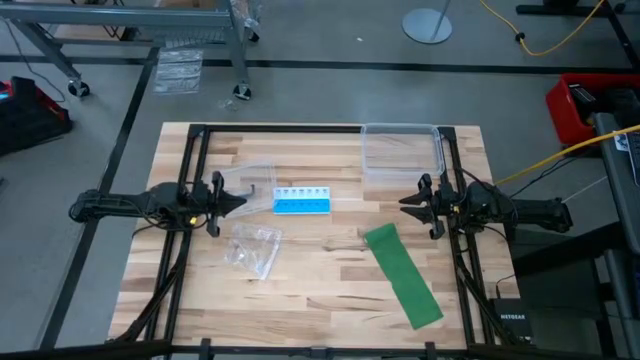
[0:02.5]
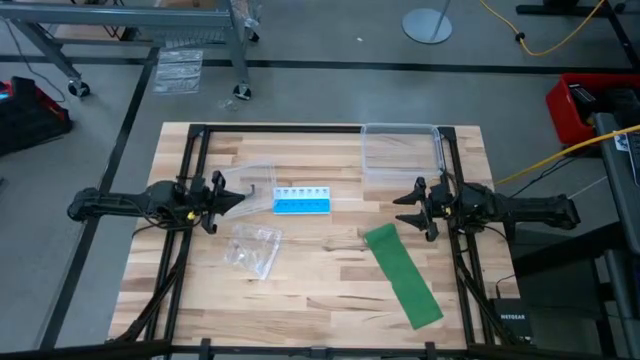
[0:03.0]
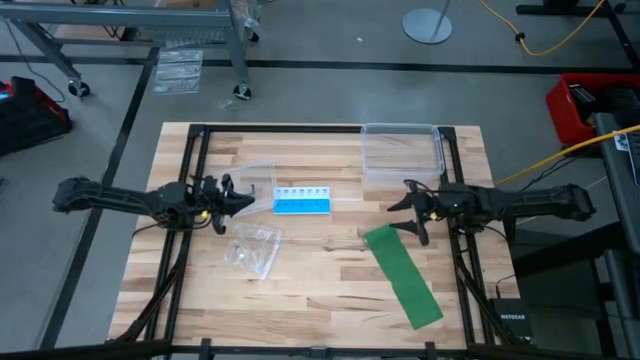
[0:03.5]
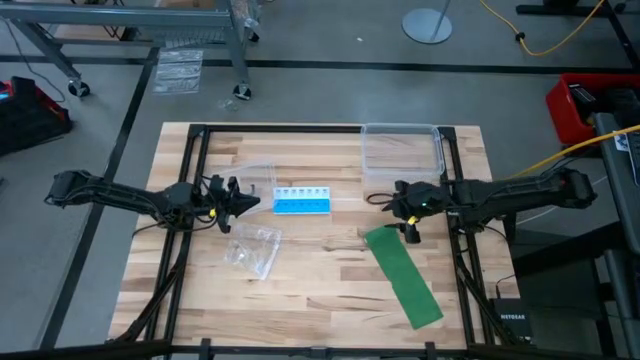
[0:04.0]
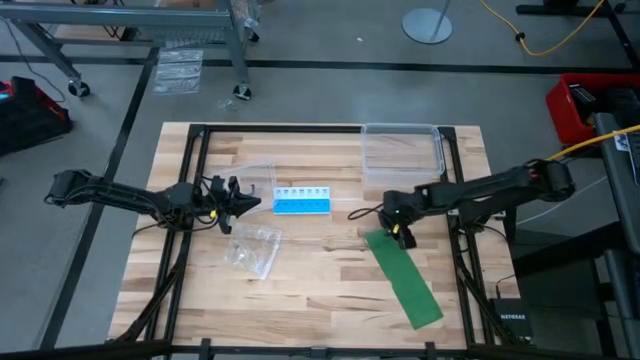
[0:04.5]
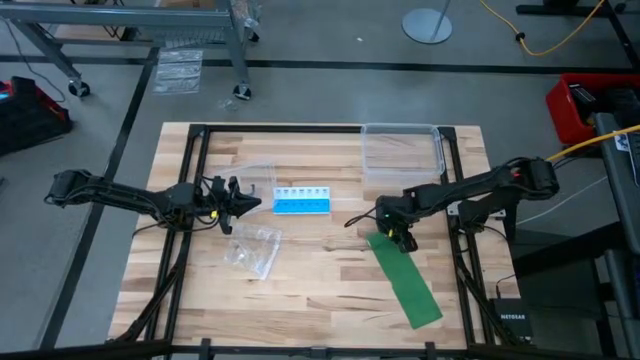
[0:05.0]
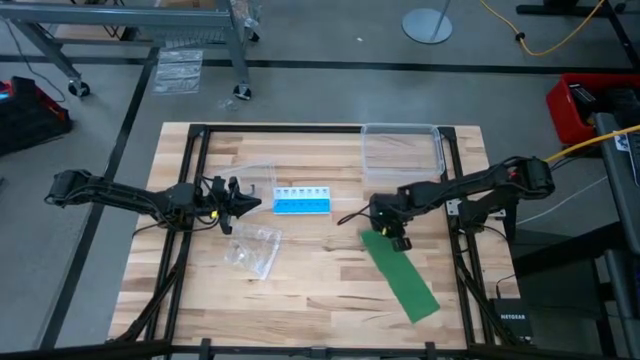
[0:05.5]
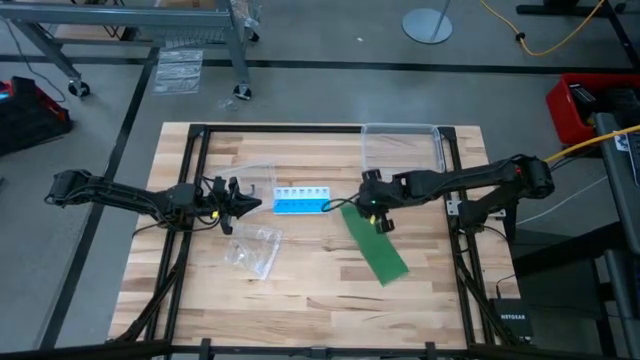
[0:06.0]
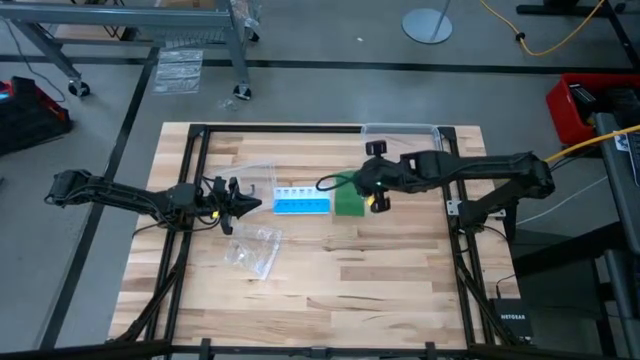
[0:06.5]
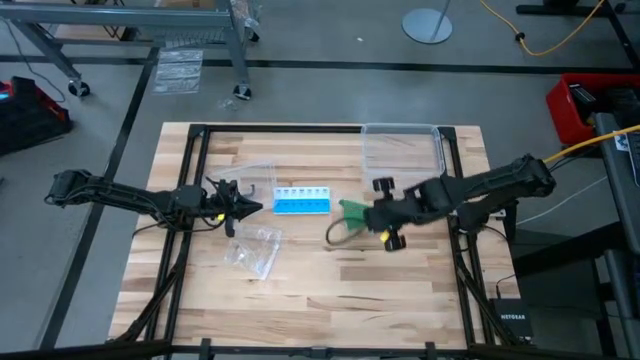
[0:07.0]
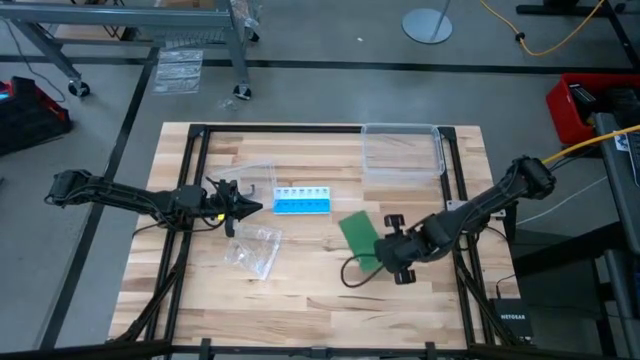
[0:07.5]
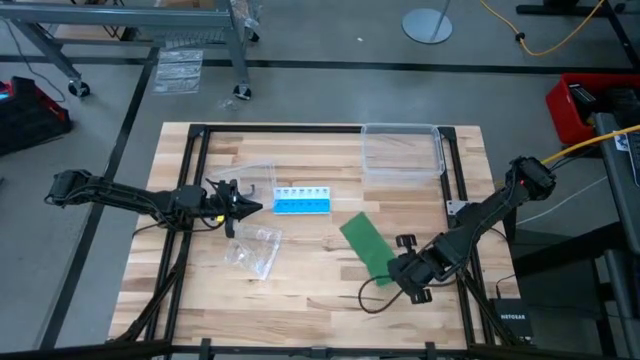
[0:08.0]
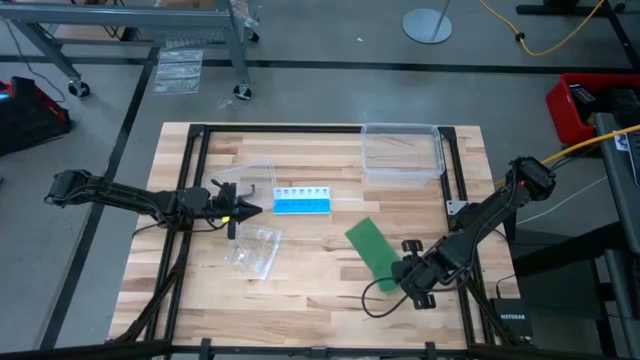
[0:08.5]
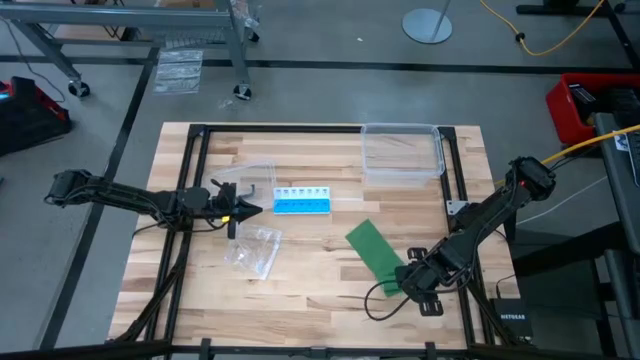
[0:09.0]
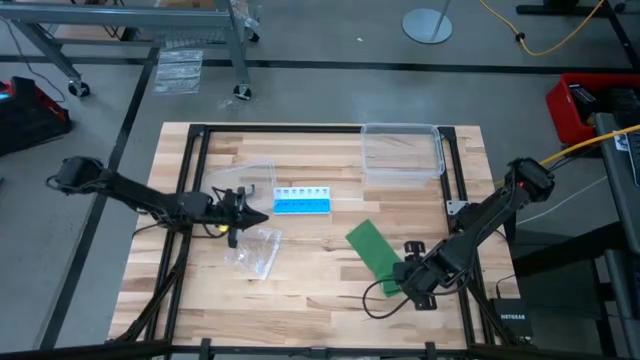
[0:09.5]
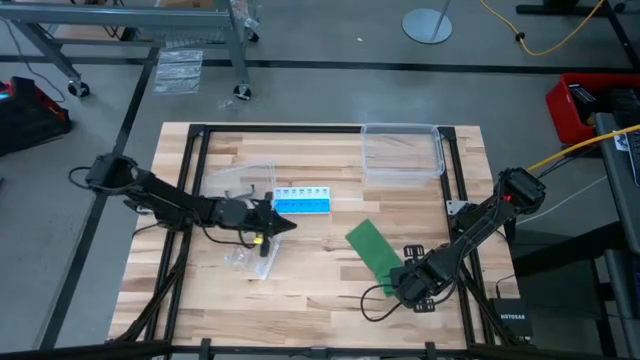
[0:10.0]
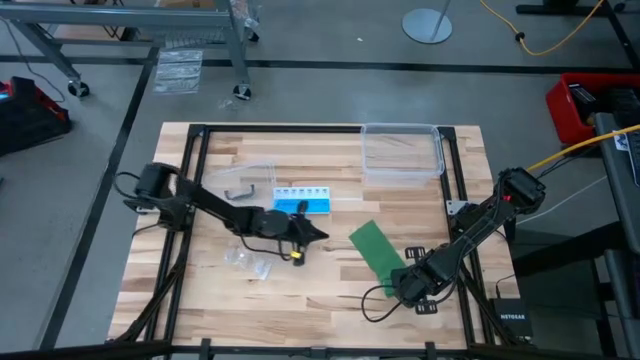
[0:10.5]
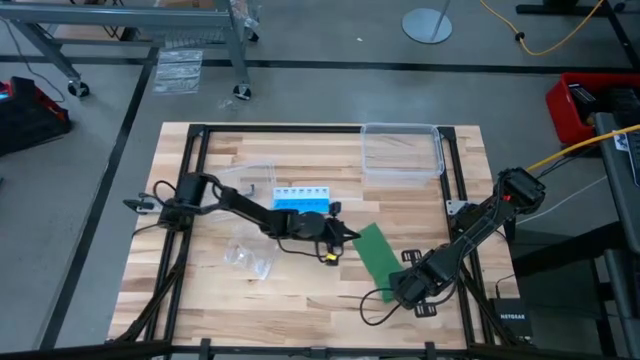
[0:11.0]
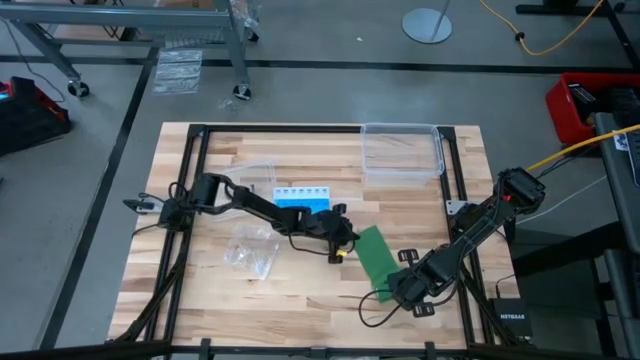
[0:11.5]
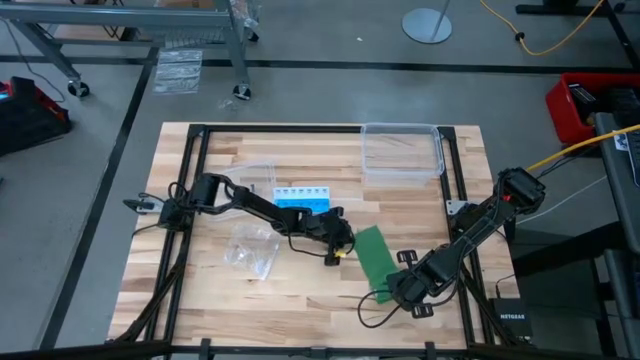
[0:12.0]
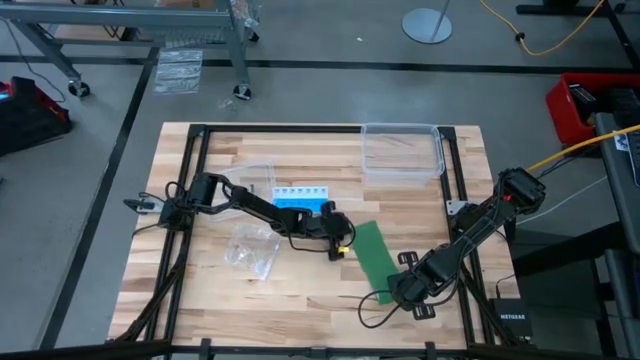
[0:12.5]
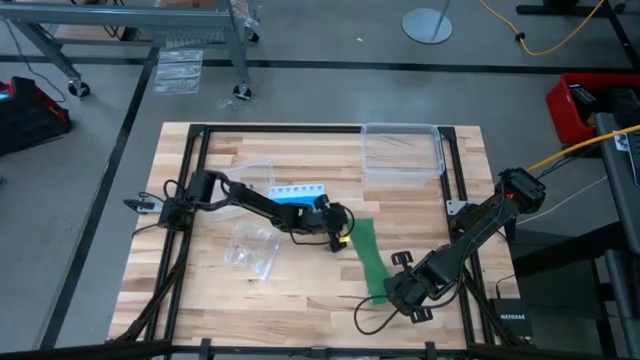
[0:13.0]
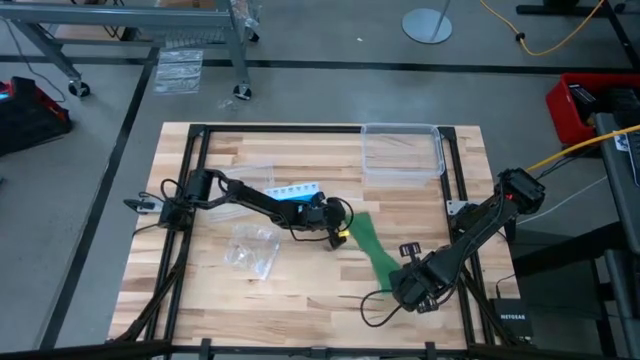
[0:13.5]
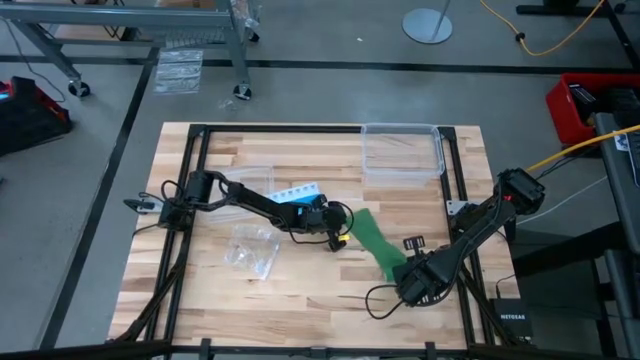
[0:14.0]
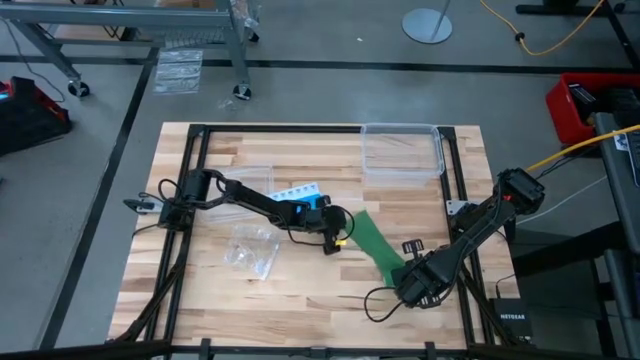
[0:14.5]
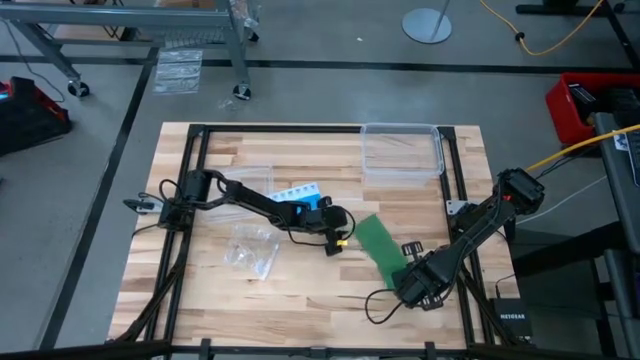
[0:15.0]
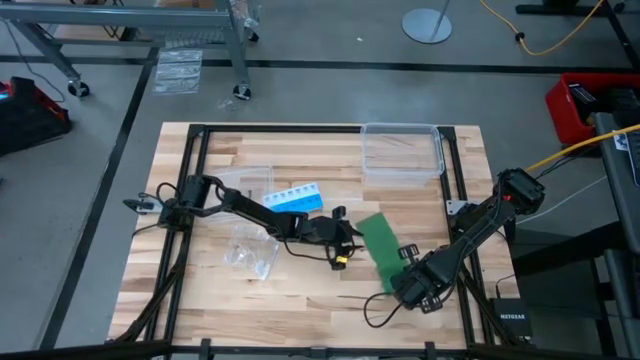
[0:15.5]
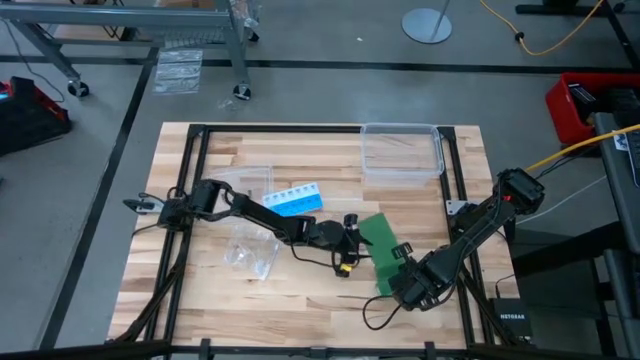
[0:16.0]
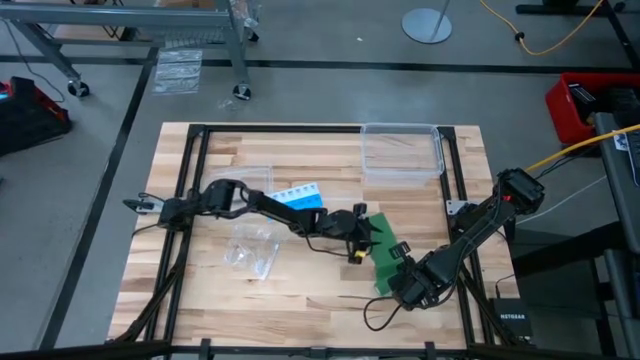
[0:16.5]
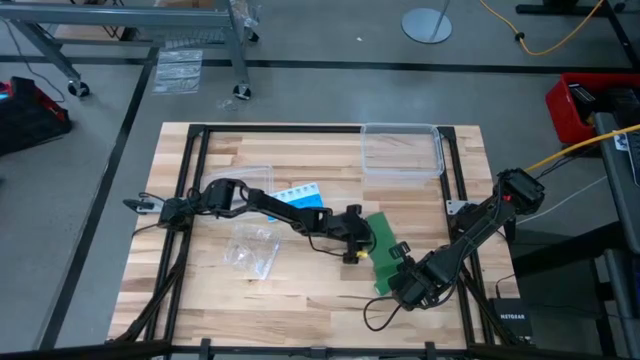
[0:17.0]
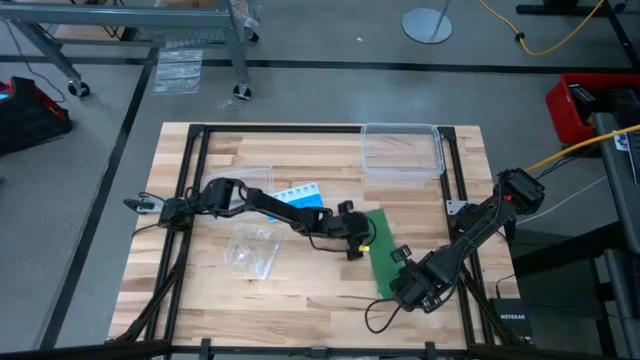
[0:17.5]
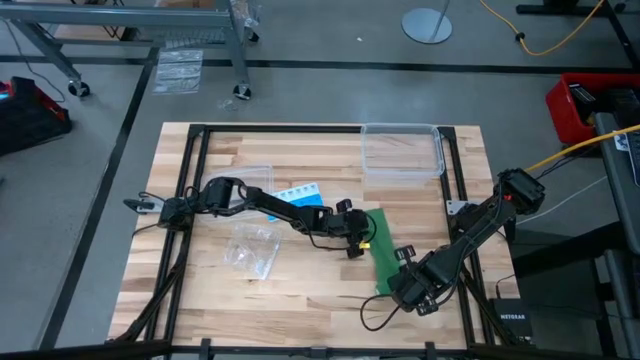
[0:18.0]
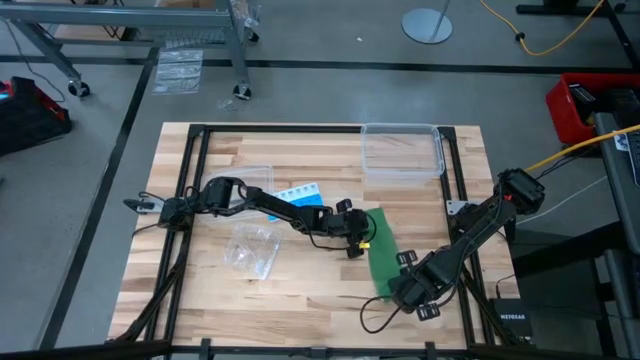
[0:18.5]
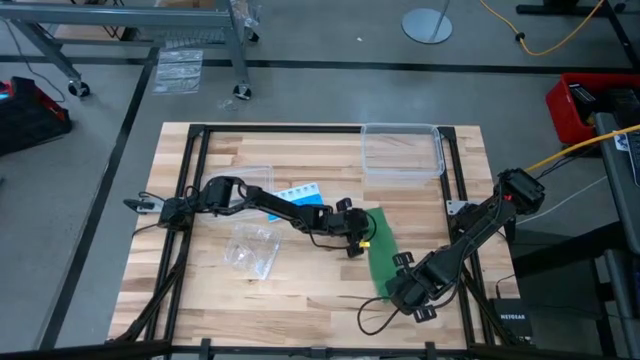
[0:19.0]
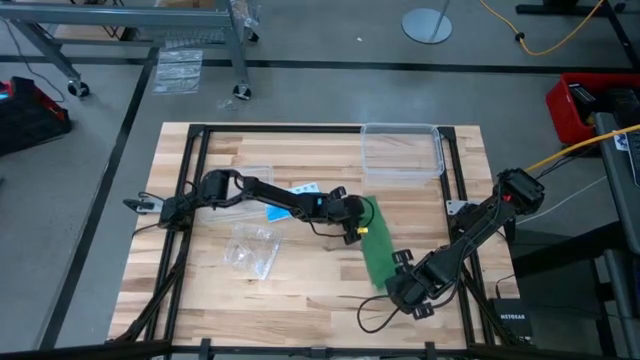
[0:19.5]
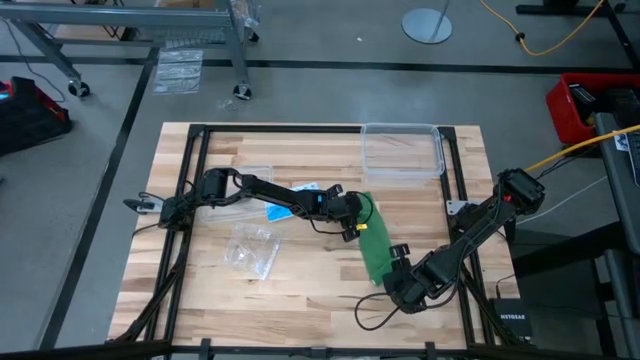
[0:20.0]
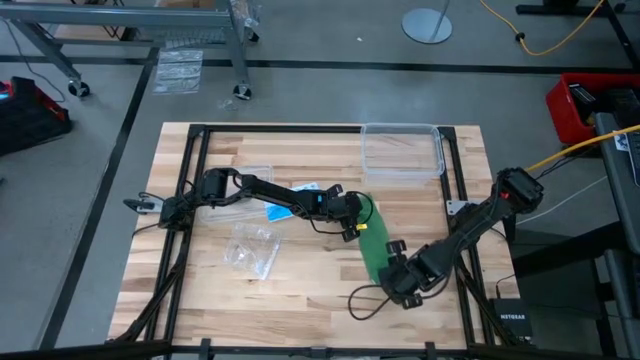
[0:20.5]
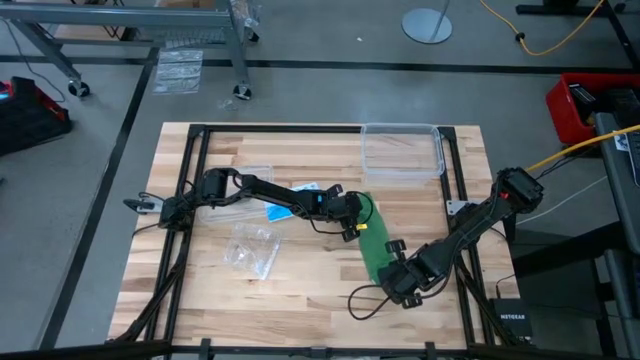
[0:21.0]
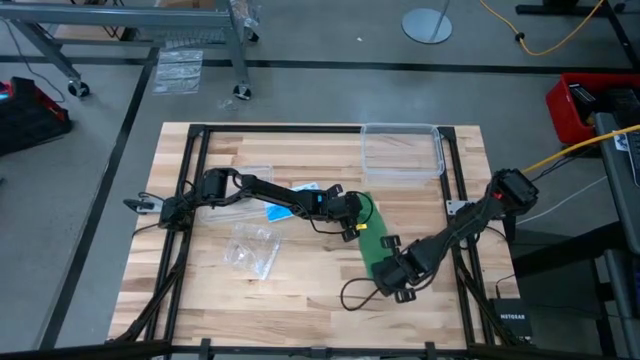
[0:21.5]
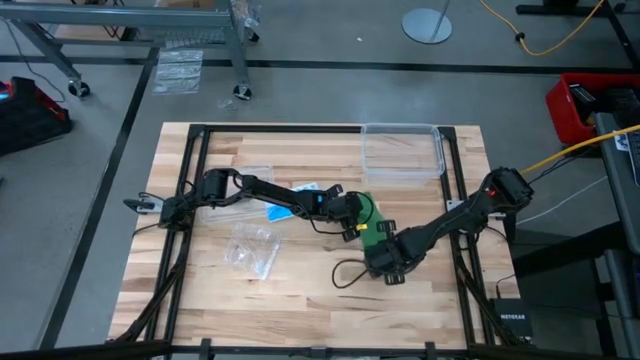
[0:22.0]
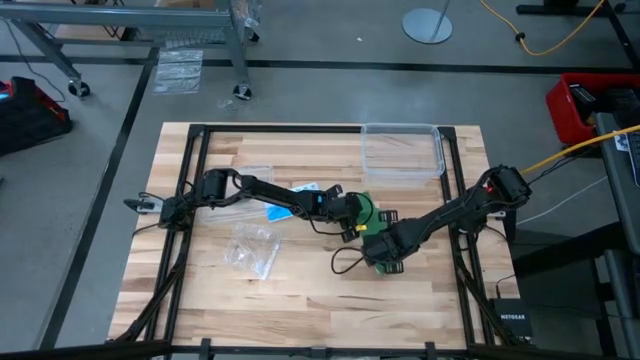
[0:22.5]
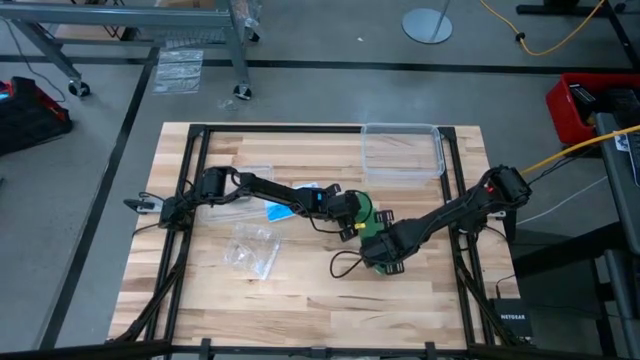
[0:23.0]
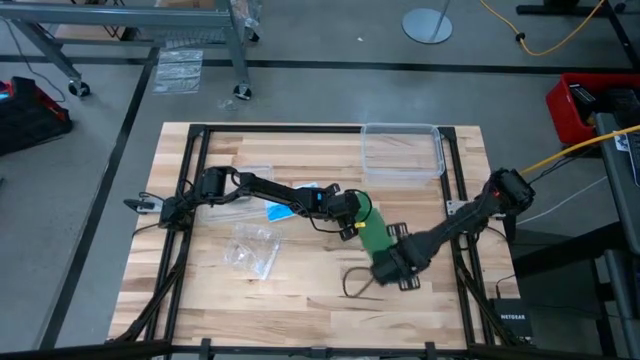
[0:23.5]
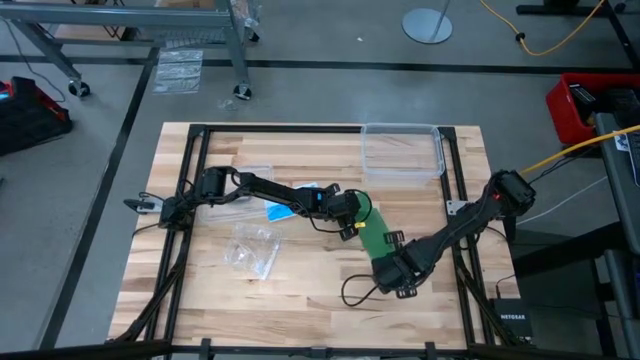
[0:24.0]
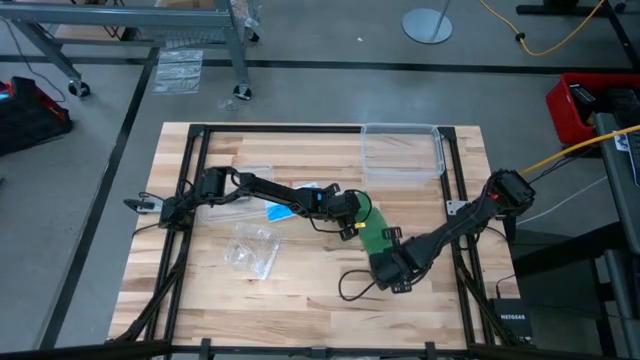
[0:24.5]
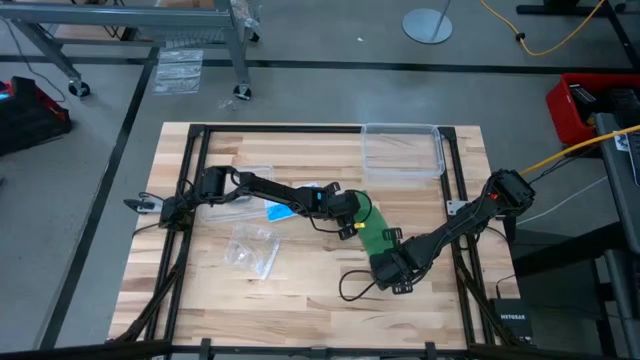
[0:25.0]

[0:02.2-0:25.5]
Task: Roll bandage
Roll the green bandage
